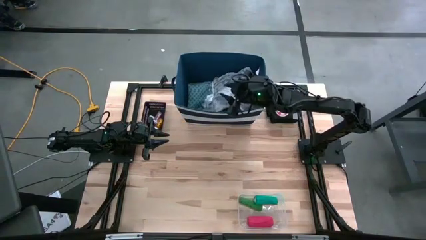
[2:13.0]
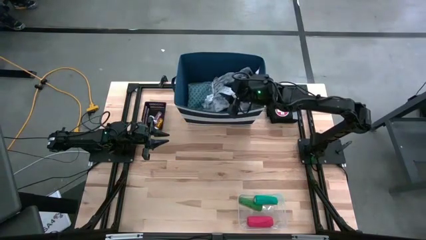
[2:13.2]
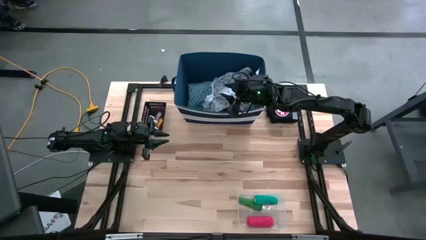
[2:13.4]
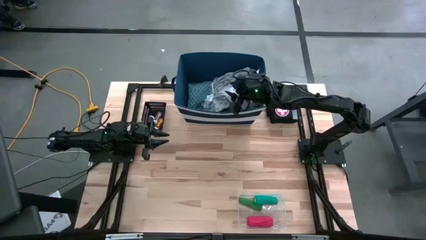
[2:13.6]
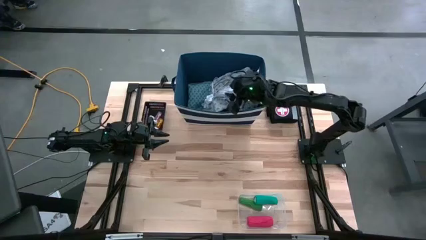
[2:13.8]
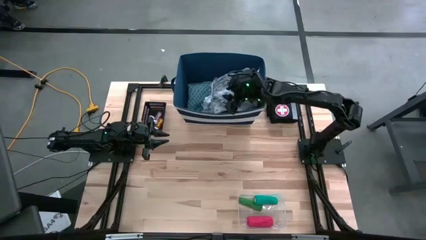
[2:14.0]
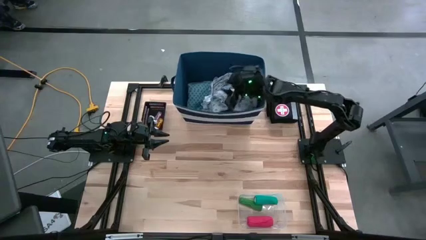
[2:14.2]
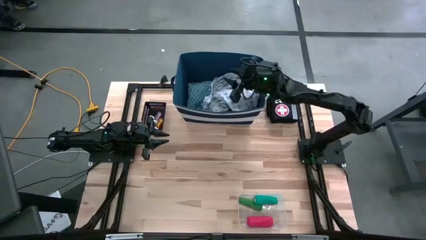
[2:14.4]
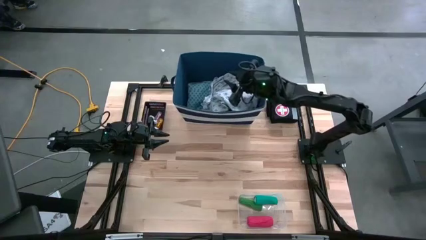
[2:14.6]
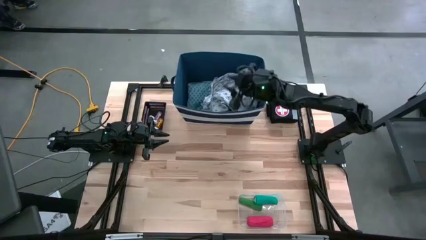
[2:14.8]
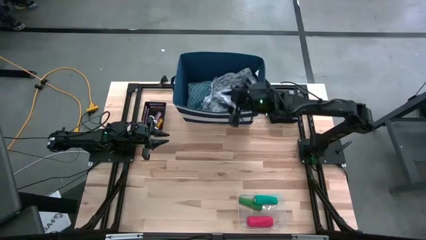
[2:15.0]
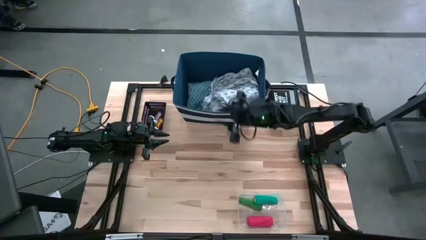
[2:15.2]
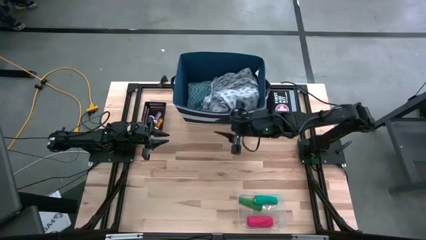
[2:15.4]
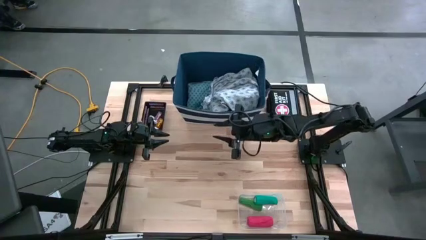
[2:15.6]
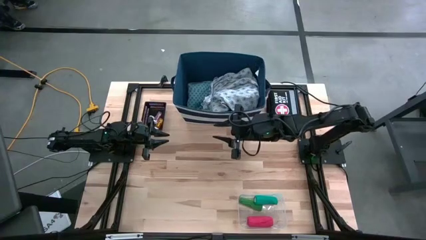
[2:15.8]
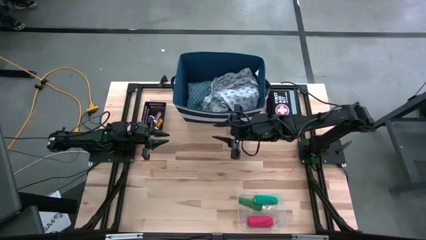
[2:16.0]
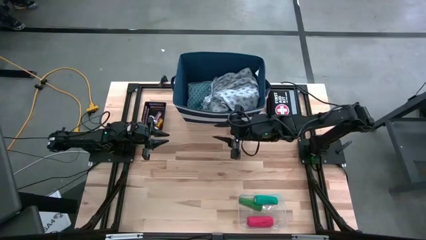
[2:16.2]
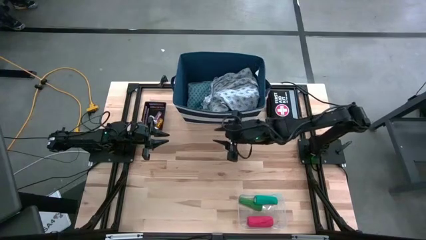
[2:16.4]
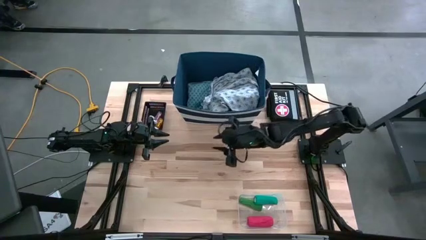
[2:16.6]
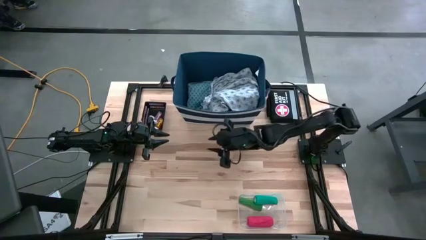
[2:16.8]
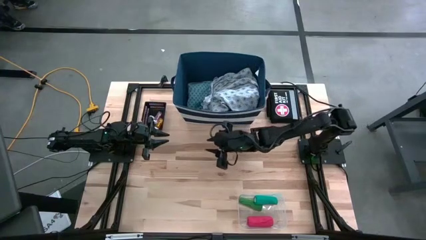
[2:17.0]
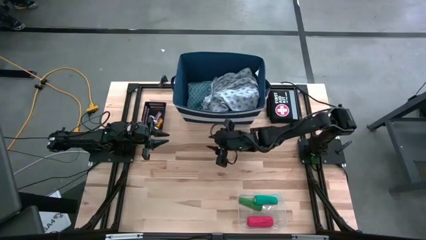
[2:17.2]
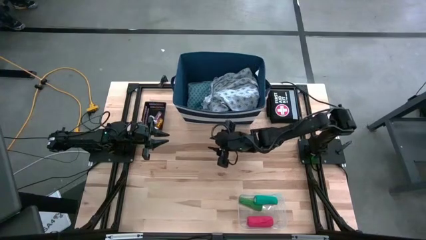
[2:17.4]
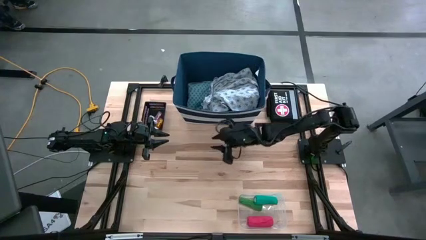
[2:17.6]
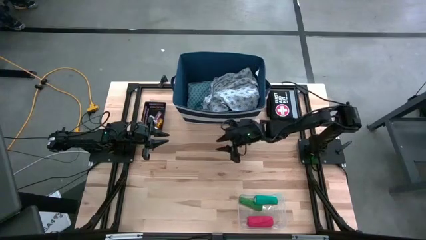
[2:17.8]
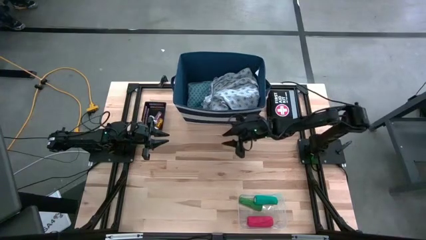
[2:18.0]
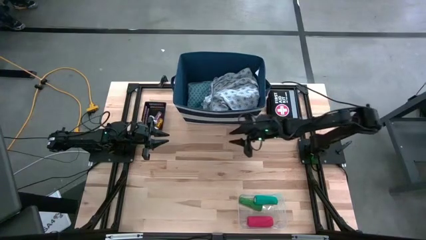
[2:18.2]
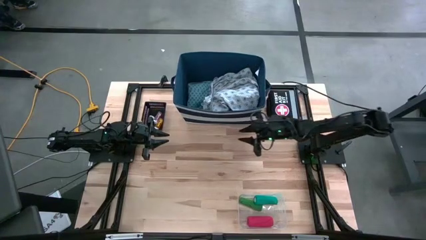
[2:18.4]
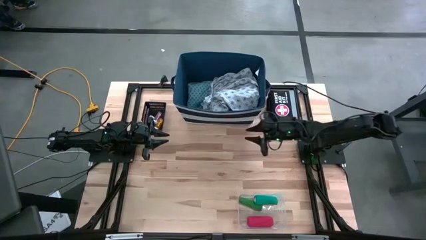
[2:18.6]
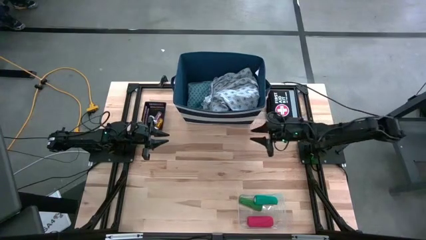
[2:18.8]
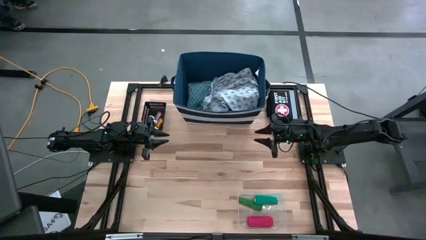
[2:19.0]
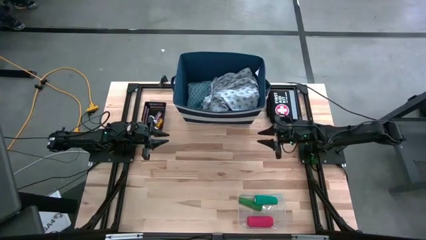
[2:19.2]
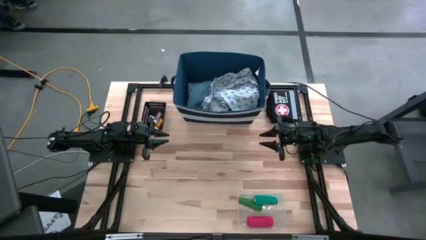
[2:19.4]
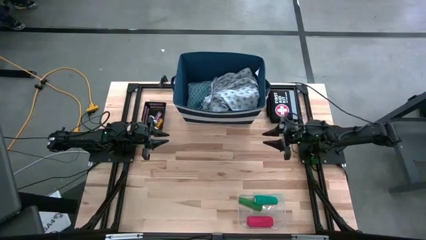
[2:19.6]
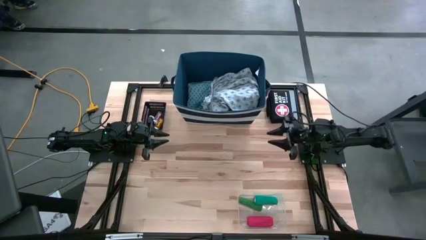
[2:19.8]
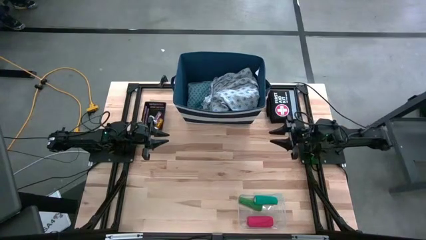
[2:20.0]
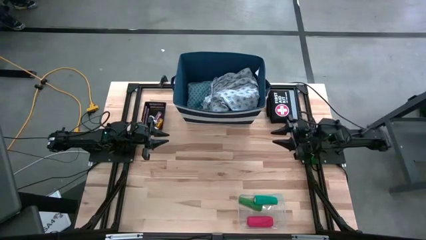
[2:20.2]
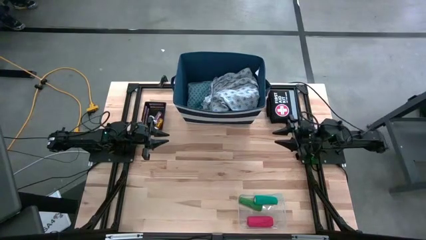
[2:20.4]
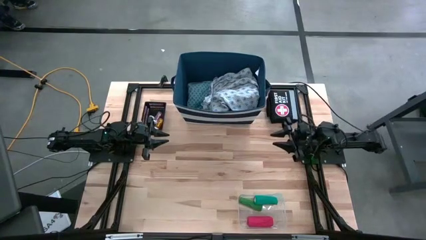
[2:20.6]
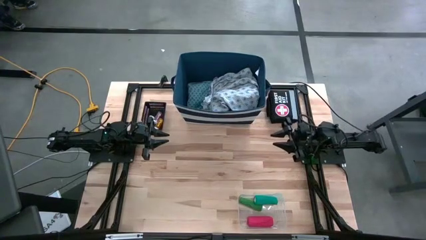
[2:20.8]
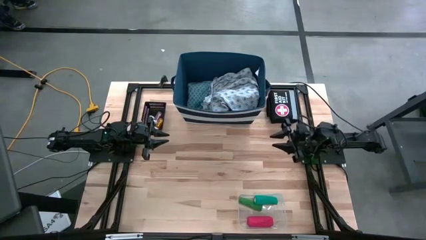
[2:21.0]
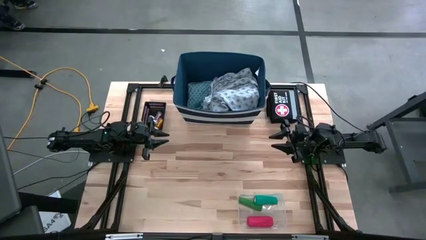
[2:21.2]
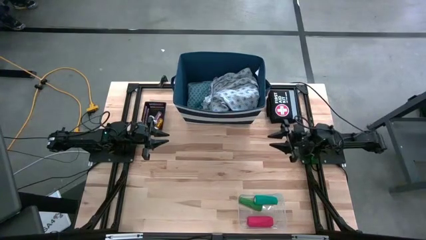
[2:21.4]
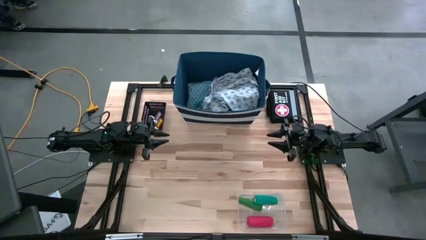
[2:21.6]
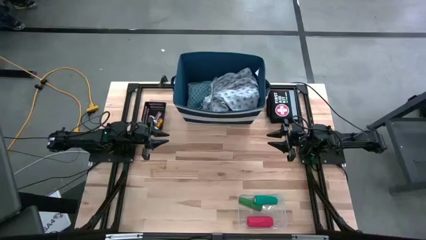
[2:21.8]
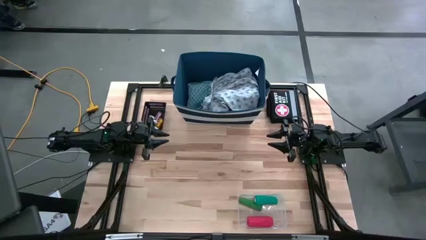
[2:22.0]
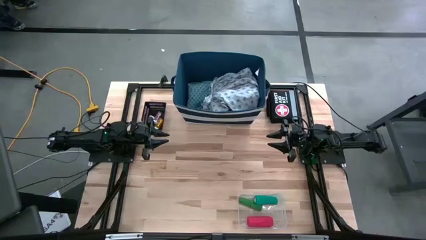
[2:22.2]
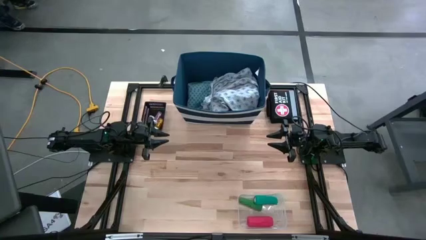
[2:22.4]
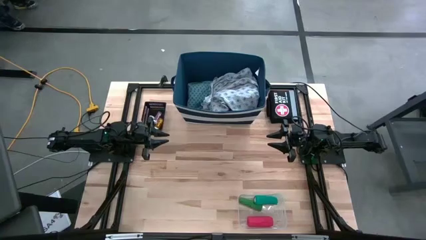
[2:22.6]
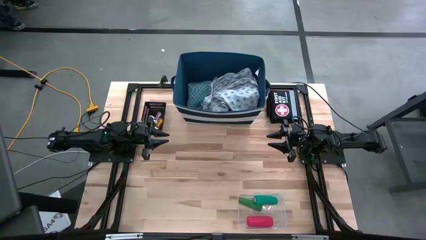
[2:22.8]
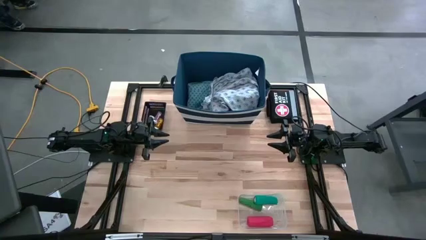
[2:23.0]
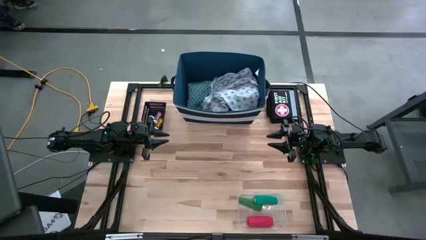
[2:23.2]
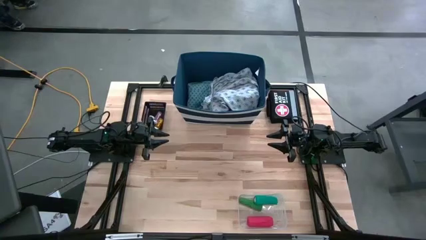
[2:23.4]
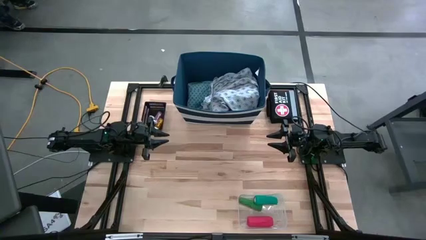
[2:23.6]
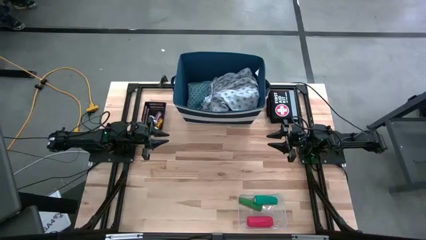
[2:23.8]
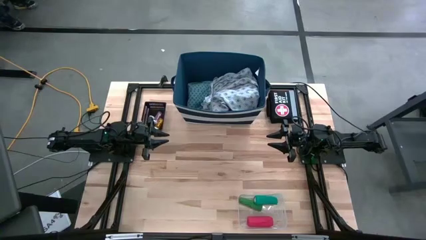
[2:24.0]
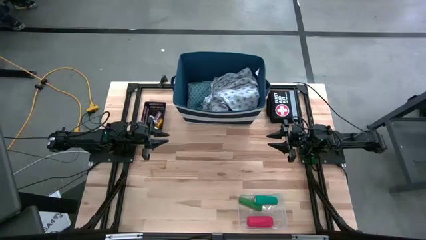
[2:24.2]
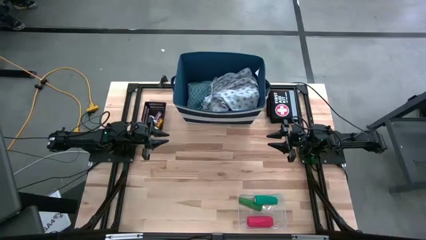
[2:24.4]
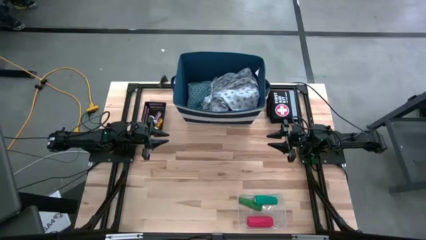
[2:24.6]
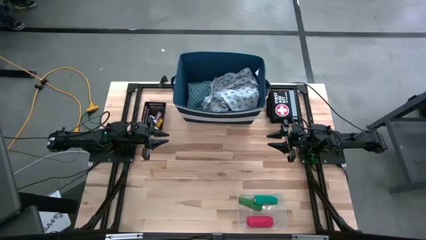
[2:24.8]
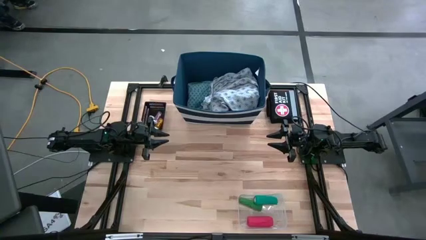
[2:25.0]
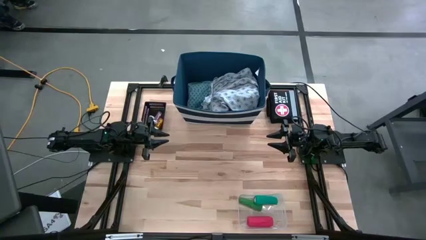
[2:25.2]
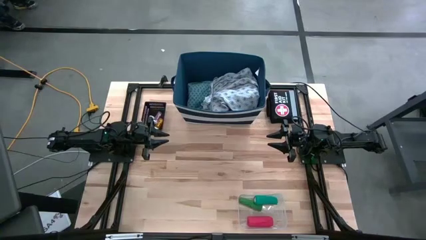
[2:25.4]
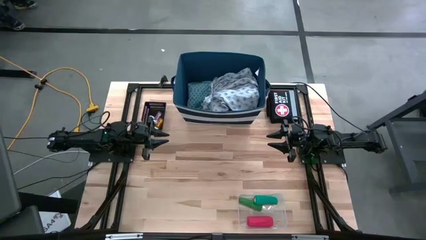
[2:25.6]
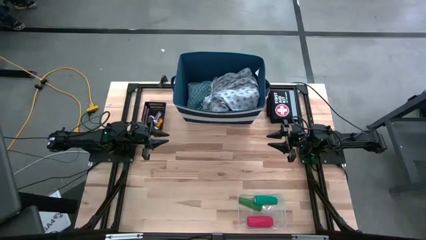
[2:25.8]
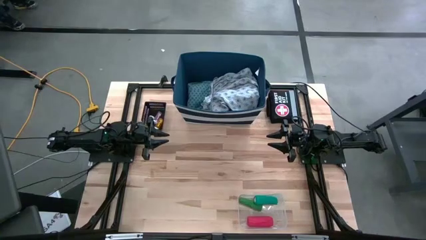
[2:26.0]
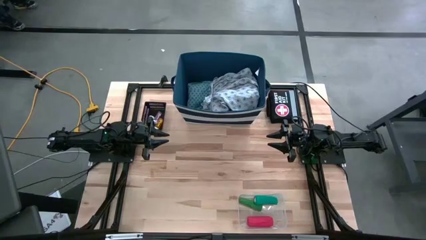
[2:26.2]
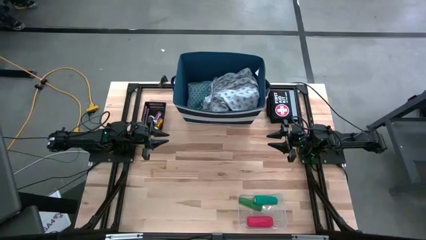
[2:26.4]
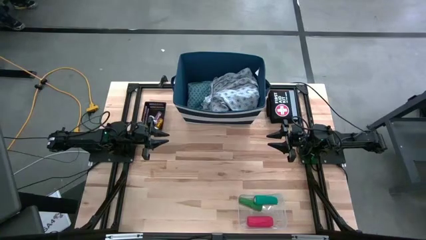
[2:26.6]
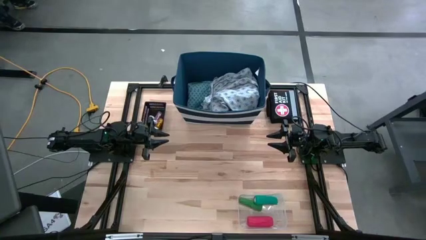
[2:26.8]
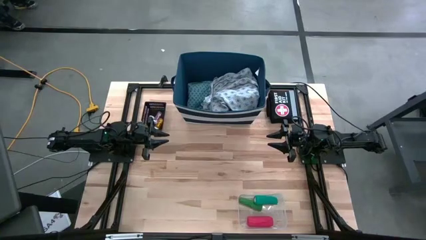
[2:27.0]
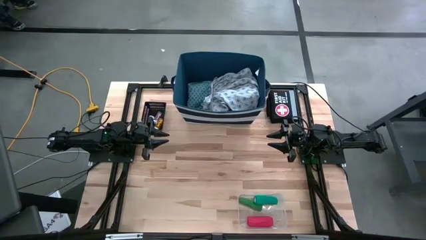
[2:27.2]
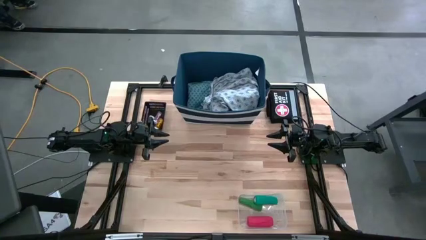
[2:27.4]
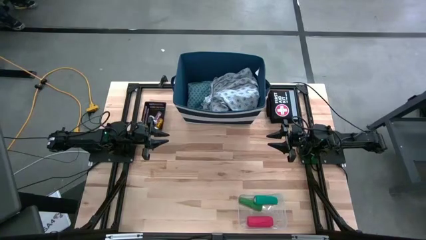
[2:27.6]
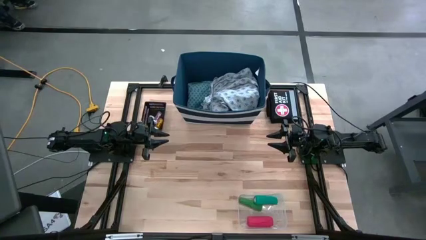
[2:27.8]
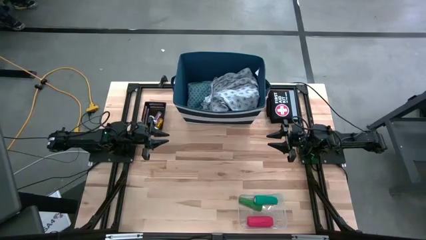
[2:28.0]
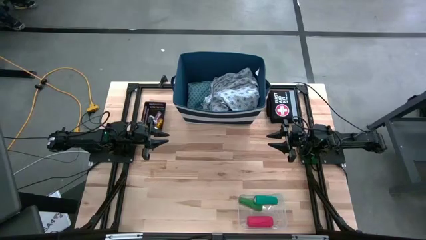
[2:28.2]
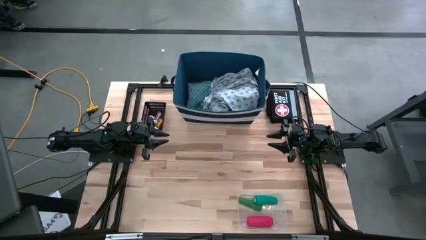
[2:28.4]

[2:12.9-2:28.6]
Task: Pick & Place Medicine items
Return to Home Position
